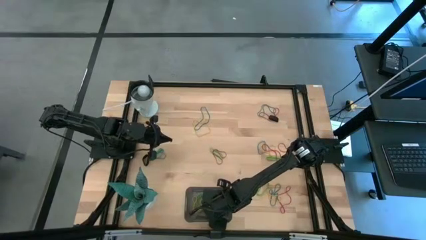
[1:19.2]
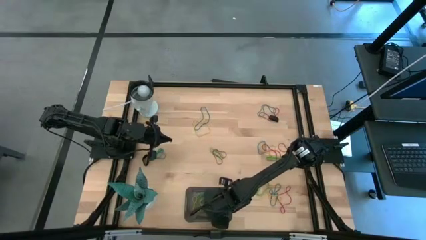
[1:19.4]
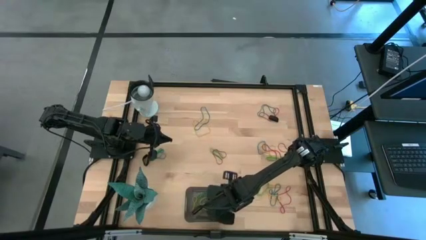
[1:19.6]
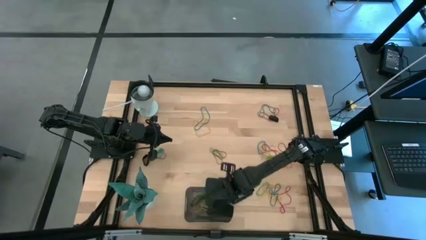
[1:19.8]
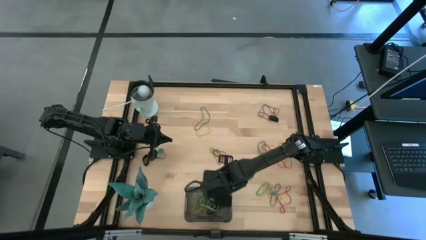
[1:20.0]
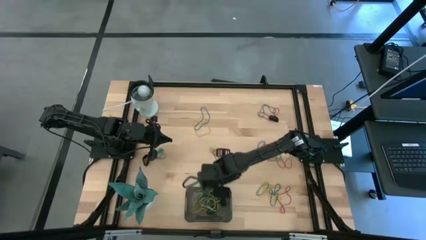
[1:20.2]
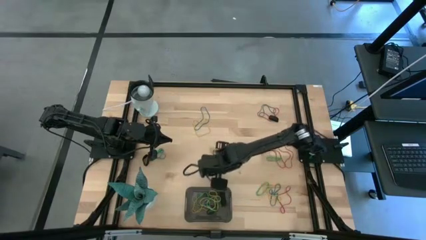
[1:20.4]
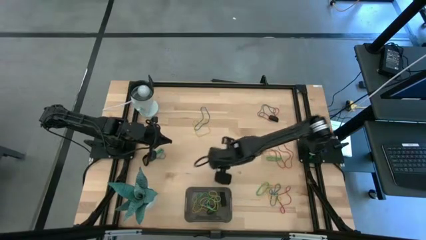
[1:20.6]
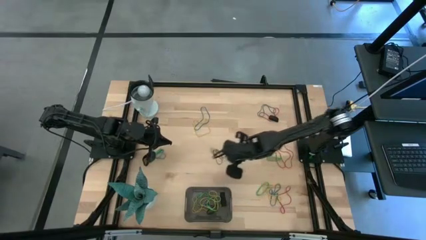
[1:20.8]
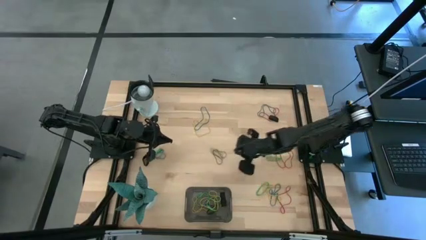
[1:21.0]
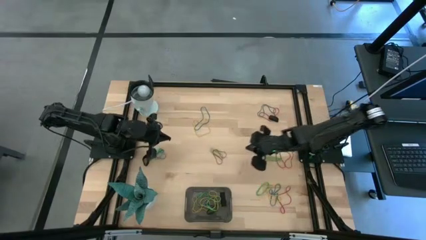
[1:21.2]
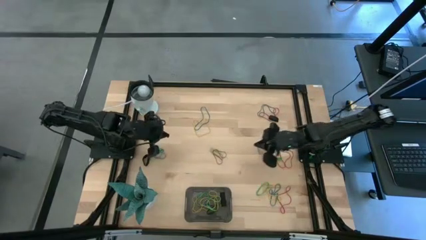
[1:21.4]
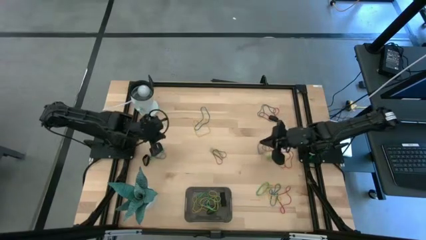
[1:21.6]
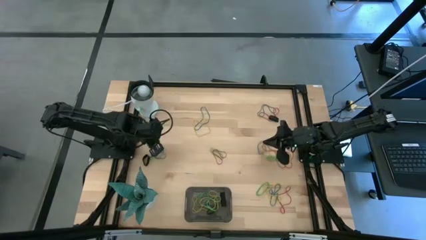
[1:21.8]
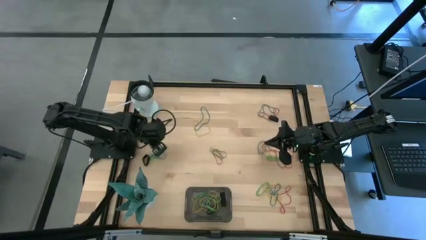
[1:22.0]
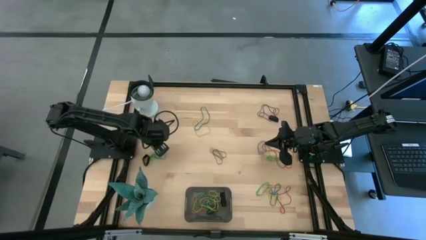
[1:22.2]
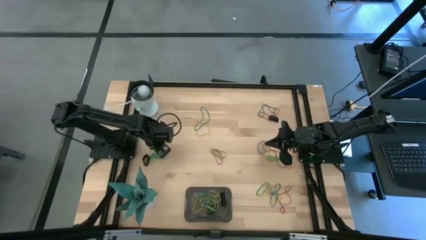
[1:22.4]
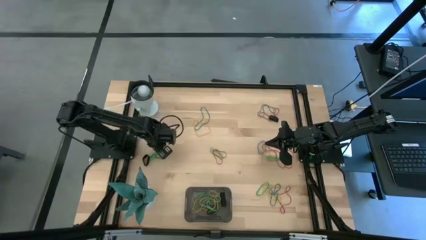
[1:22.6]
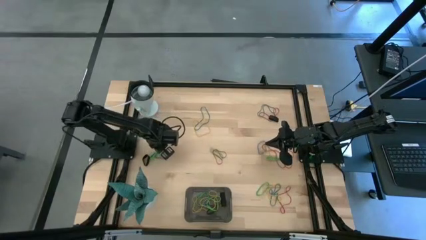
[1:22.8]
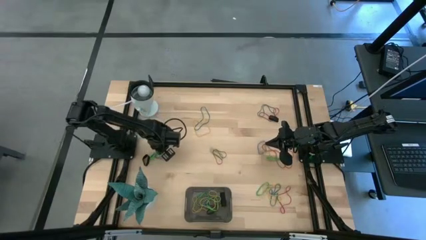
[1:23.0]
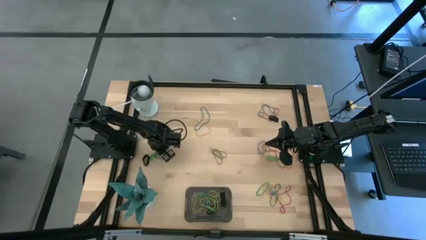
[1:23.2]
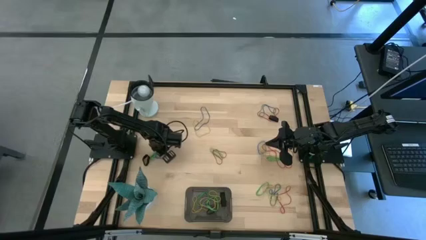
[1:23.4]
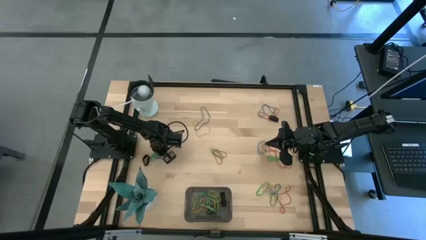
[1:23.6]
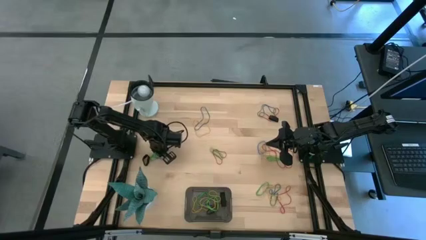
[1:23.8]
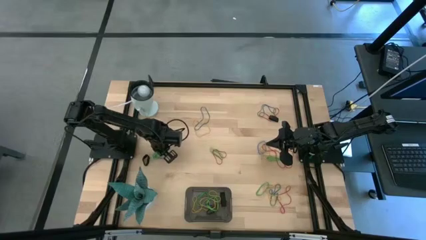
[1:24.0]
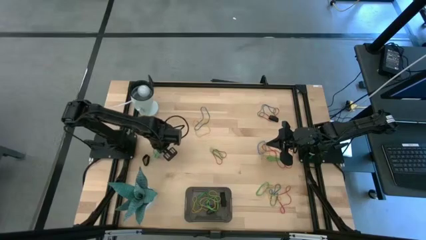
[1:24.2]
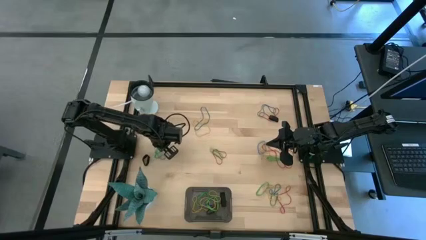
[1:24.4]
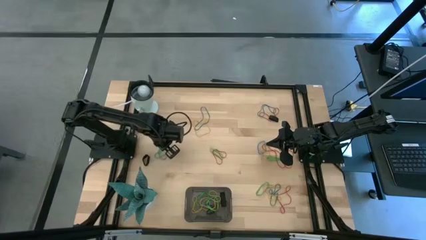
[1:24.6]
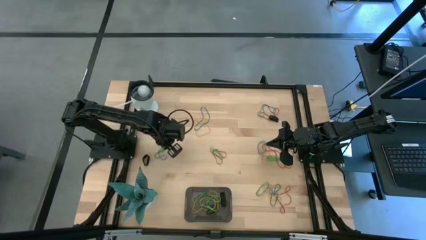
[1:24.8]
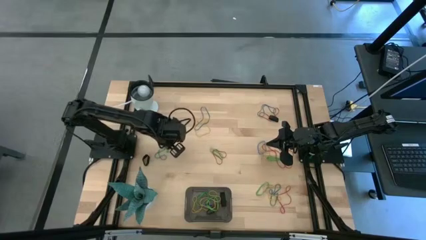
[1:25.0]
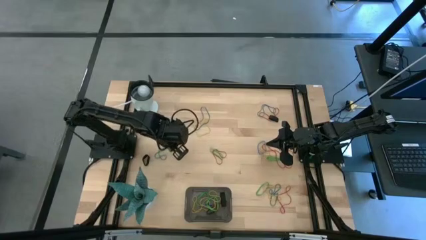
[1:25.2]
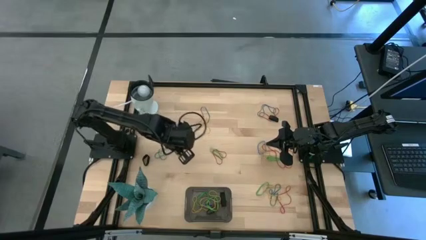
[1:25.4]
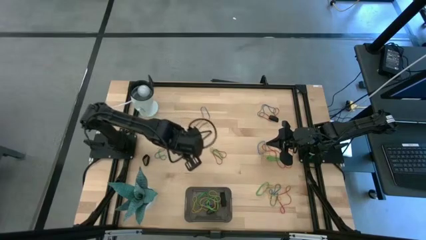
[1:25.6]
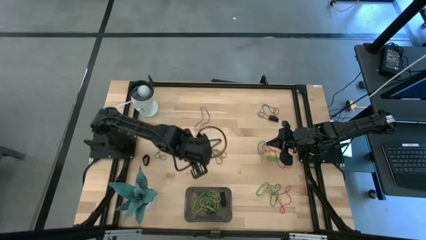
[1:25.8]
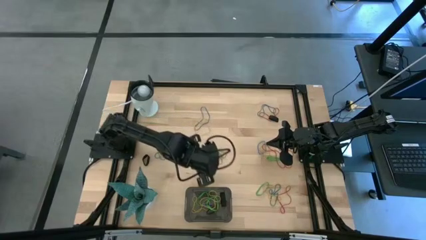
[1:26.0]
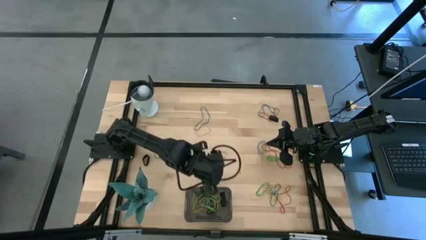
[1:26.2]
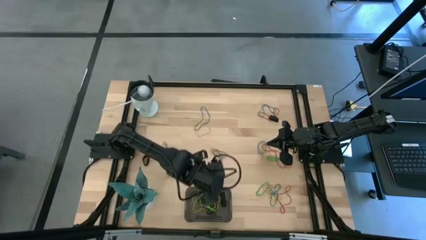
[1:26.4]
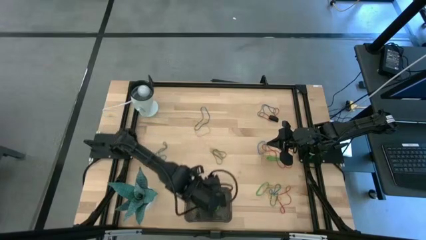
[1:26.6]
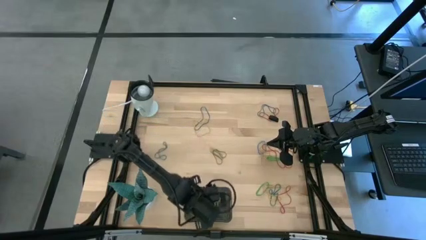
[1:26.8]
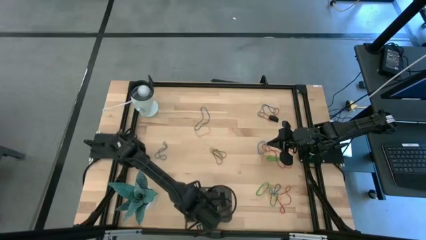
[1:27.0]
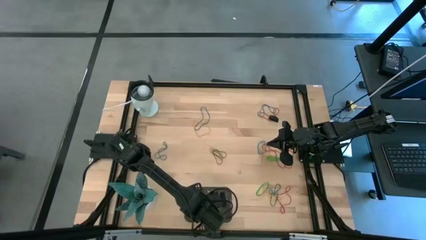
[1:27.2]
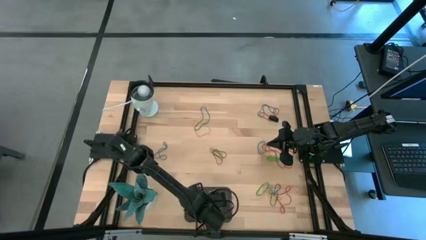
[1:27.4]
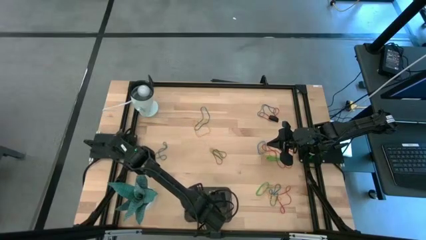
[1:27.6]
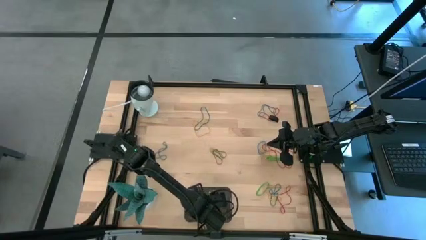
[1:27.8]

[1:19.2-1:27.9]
Task: Pick and place rubber bands into bin
Put the green rubber band into the black bin

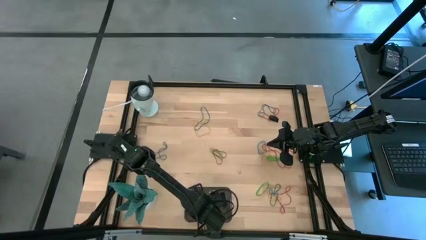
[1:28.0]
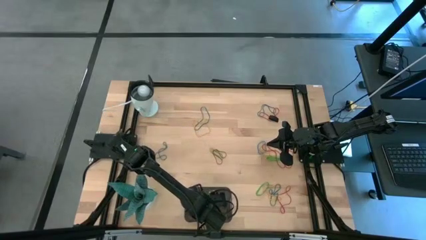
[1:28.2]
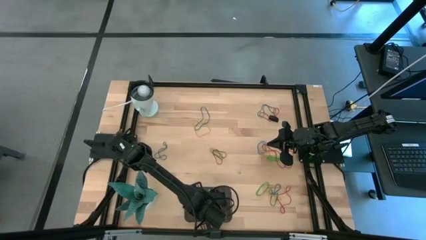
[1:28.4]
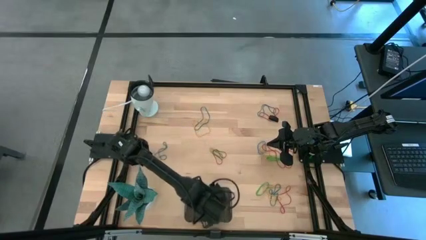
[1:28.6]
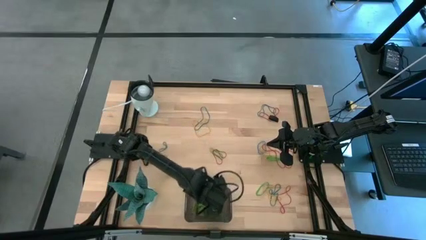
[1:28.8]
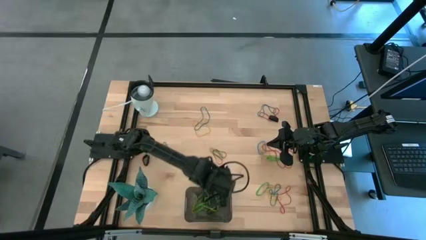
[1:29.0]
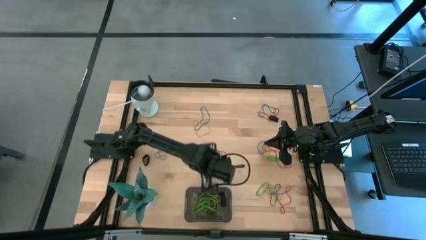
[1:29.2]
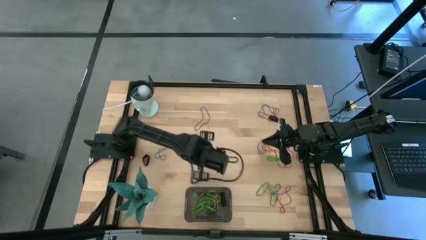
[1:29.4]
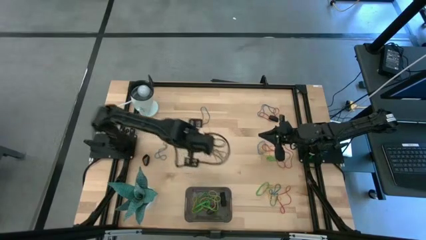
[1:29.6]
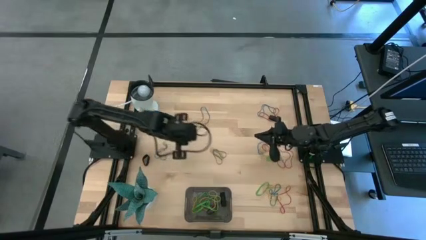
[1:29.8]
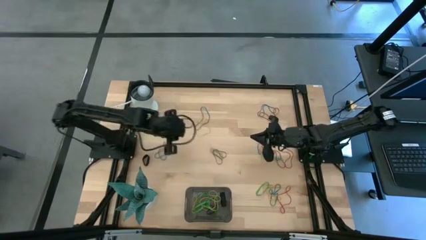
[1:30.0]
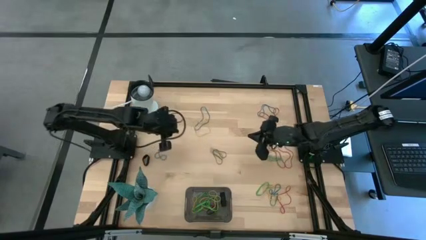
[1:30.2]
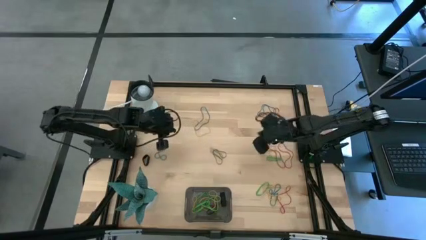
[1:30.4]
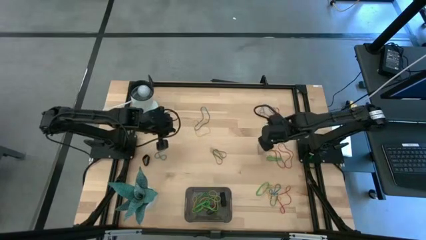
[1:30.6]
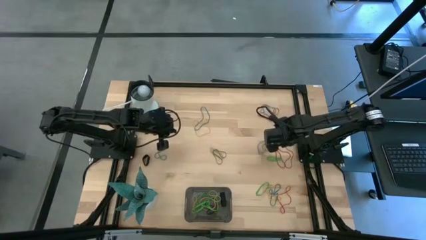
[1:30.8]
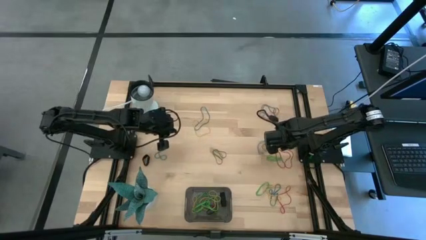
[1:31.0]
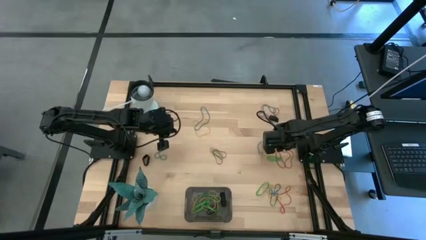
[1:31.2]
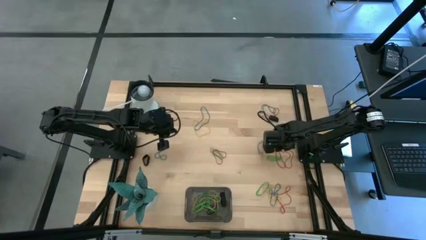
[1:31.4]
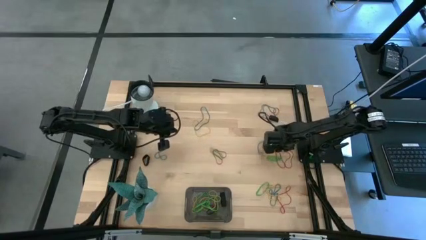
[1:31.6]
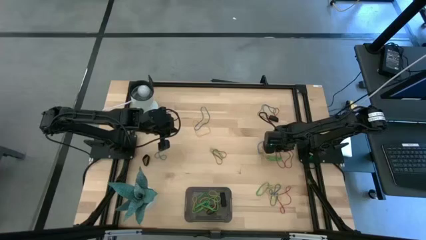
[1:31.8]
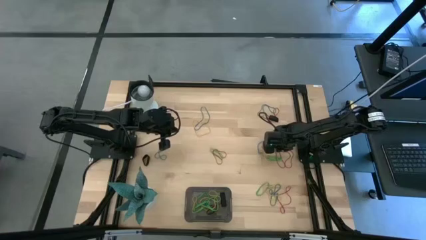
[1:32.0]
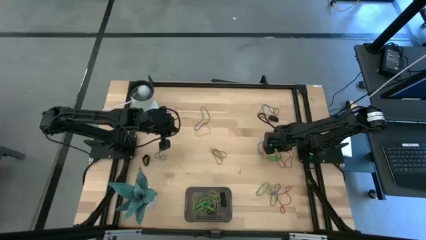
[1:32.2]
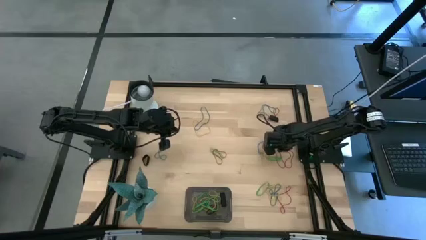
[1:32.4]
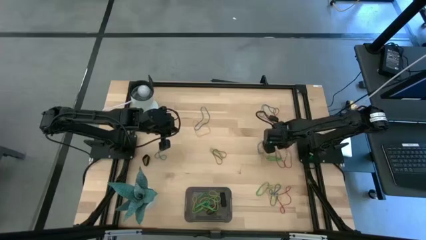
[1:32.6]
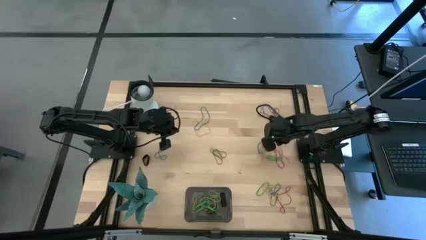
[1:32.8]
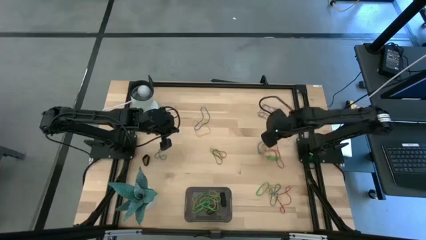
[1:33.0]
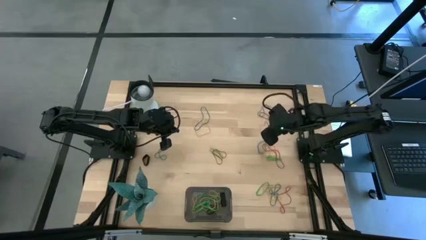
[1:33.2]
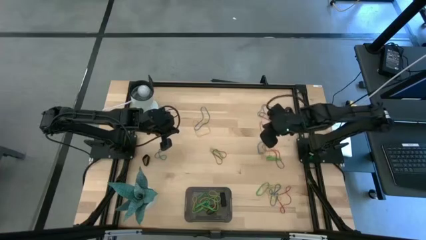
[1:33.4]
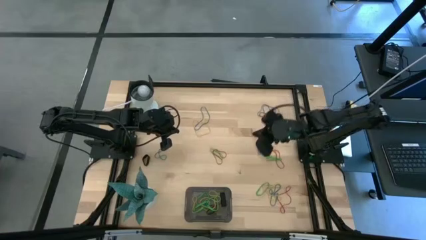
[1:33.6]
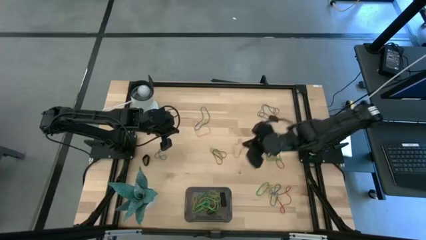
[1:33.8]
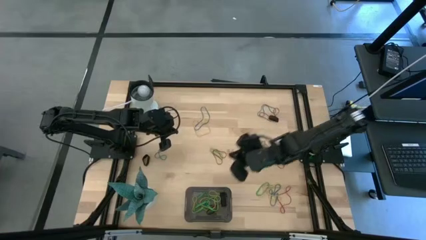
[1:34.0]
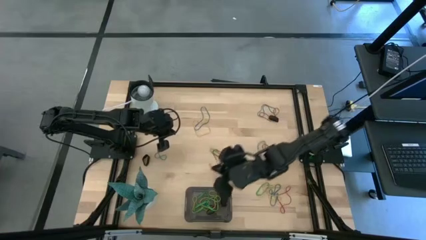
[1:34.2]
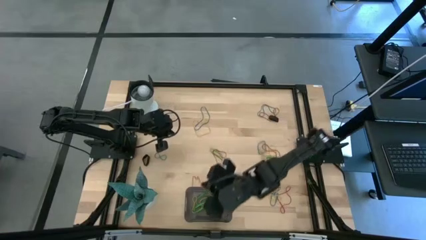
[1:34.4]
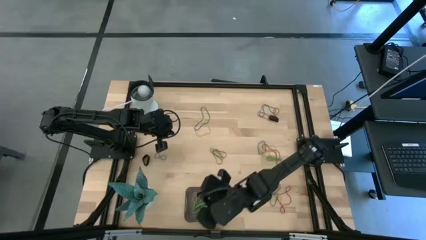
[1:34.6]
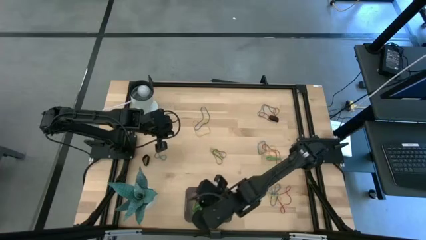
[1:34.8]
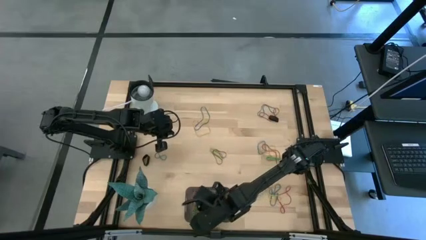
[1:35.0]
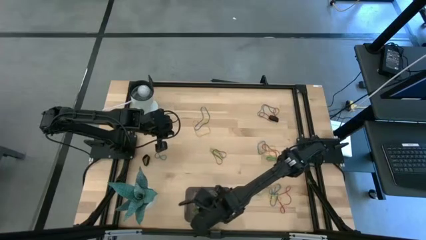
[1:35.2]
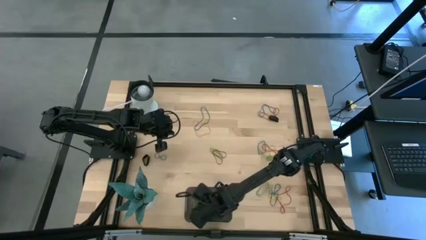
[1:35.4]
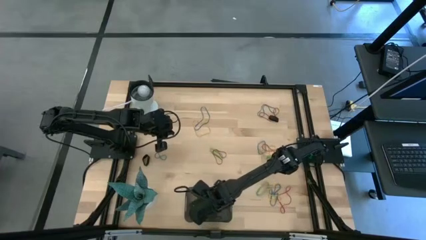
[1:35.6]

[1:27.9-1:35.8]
Put the red rubber band into the black bin
